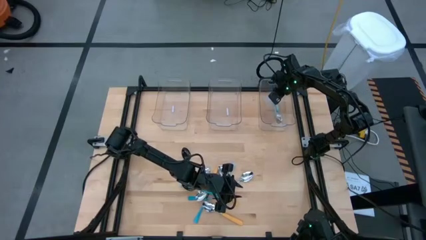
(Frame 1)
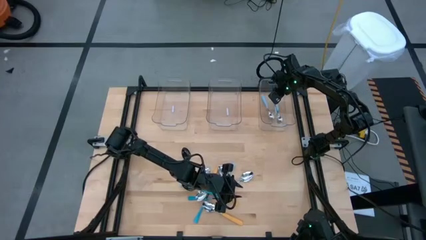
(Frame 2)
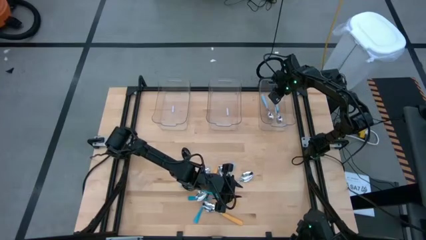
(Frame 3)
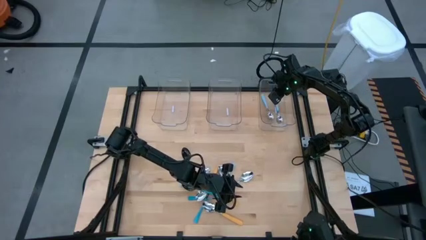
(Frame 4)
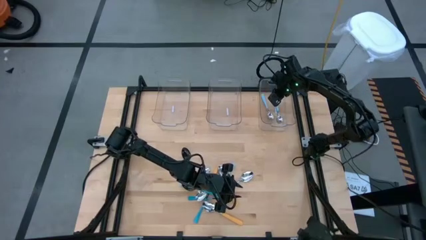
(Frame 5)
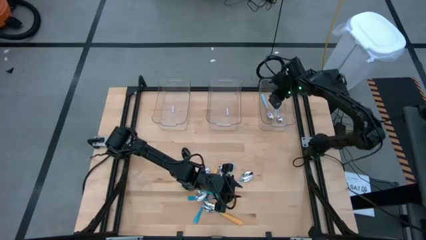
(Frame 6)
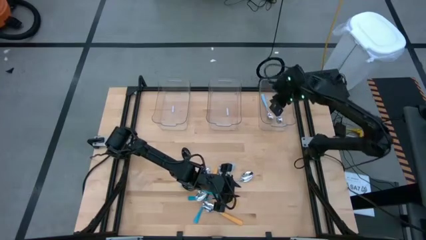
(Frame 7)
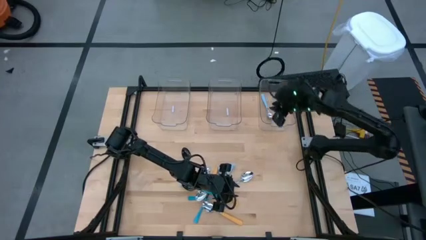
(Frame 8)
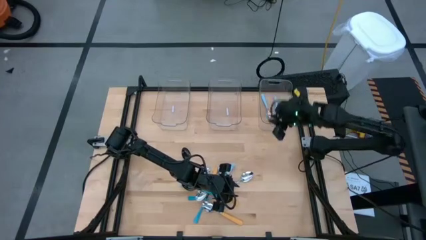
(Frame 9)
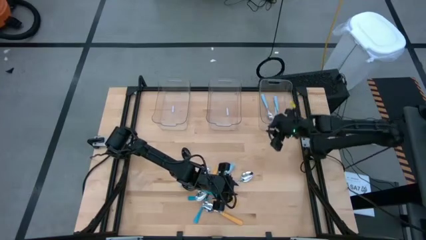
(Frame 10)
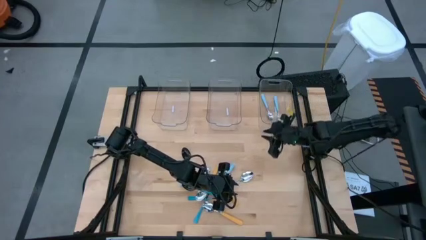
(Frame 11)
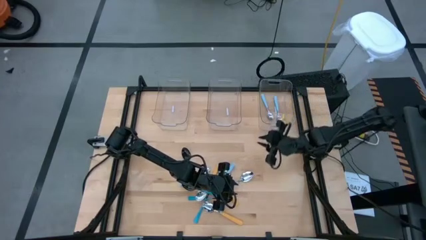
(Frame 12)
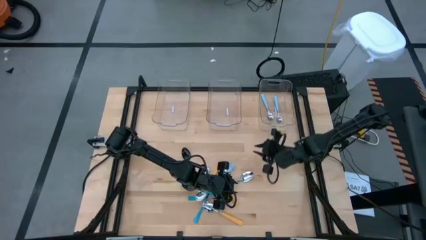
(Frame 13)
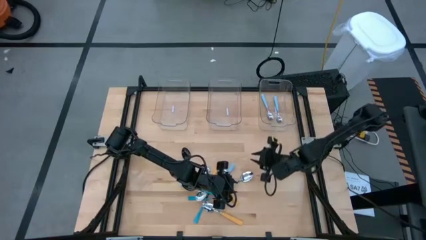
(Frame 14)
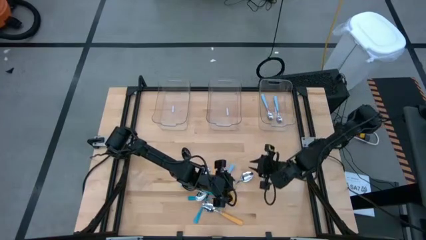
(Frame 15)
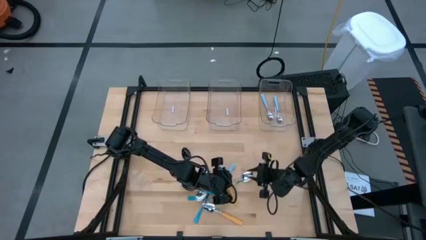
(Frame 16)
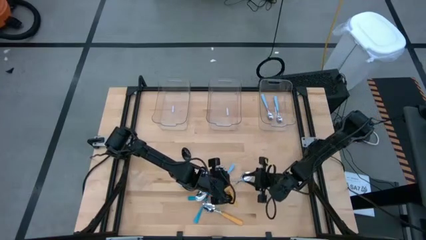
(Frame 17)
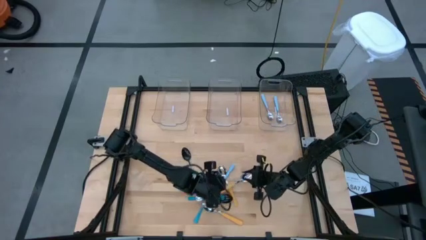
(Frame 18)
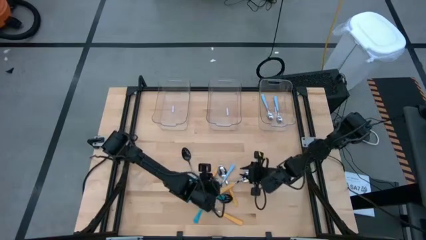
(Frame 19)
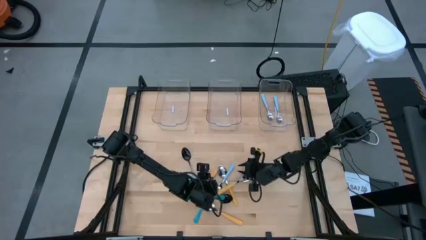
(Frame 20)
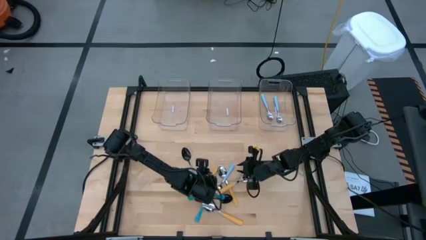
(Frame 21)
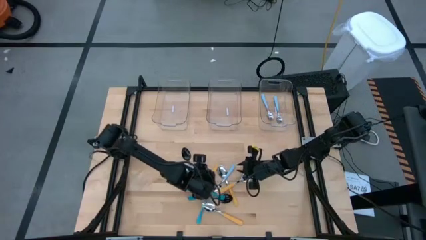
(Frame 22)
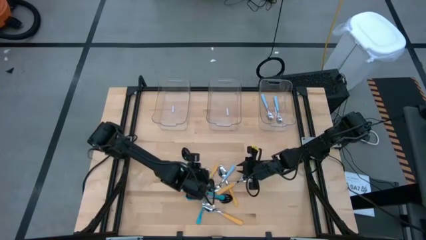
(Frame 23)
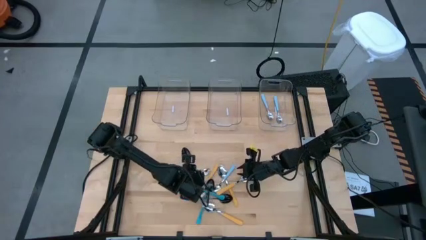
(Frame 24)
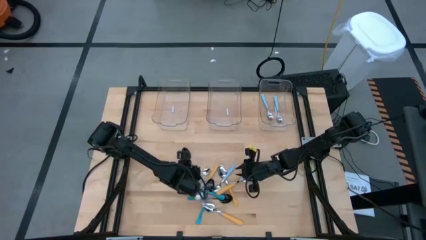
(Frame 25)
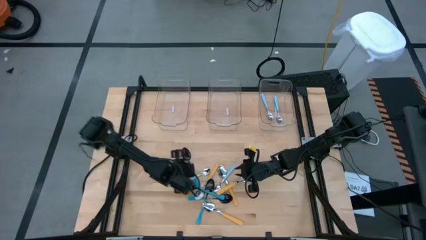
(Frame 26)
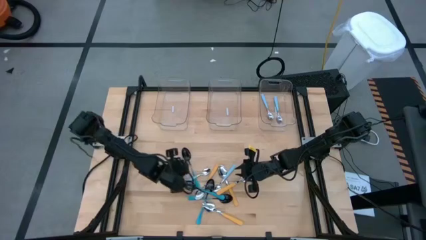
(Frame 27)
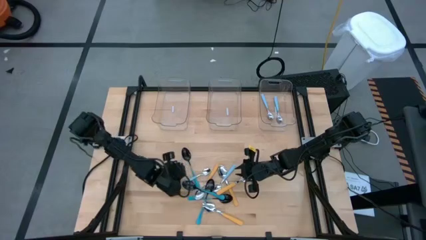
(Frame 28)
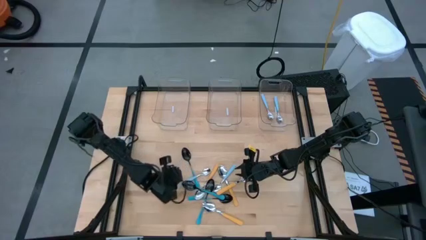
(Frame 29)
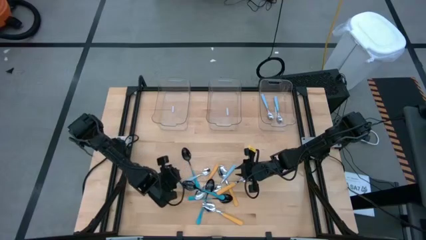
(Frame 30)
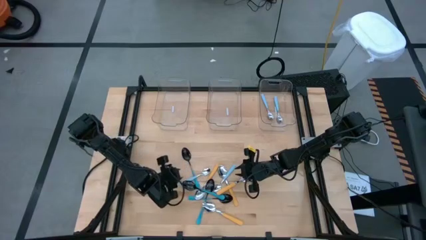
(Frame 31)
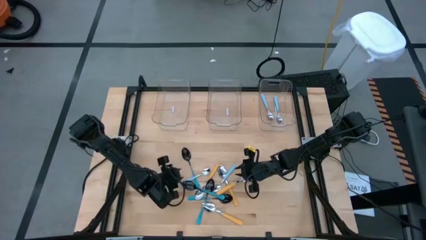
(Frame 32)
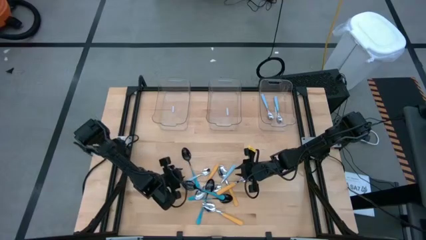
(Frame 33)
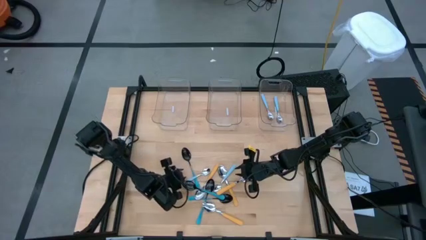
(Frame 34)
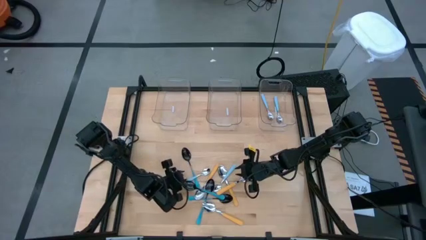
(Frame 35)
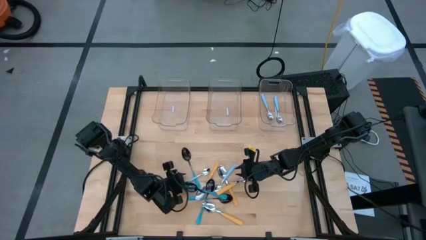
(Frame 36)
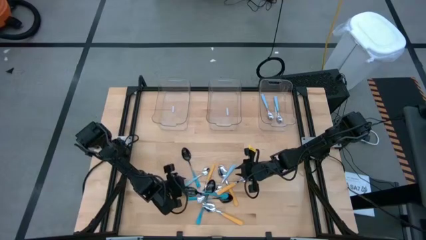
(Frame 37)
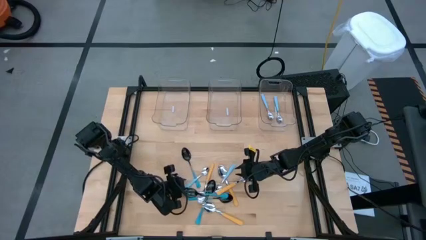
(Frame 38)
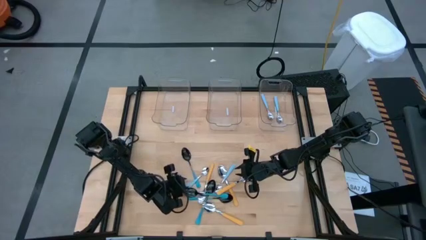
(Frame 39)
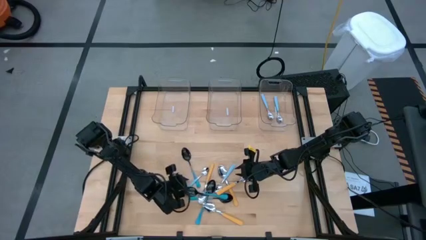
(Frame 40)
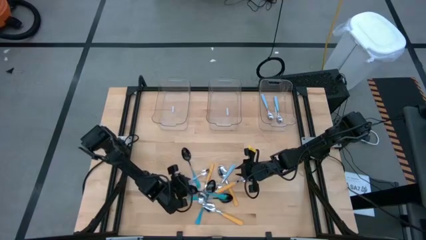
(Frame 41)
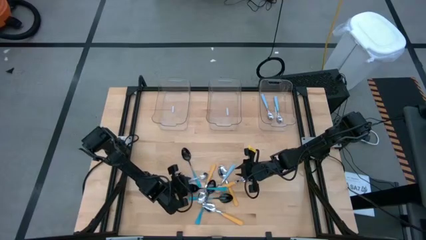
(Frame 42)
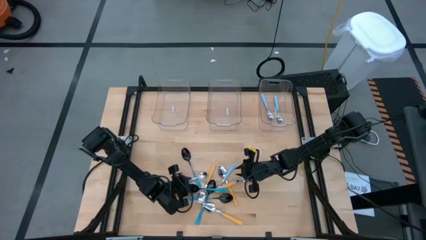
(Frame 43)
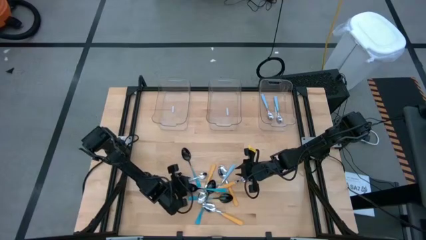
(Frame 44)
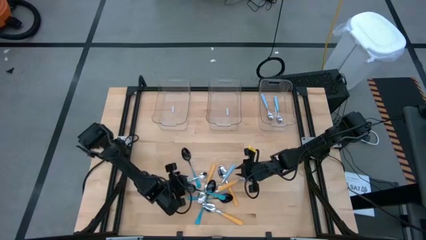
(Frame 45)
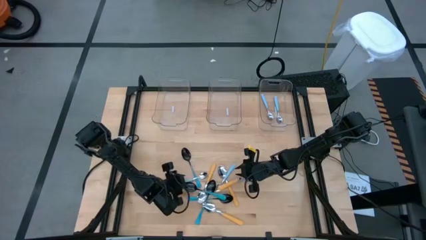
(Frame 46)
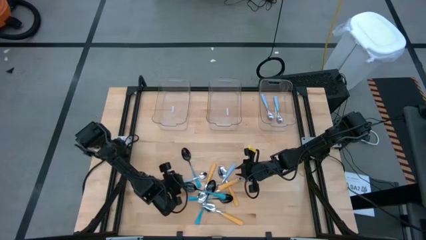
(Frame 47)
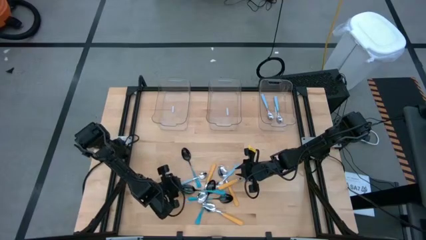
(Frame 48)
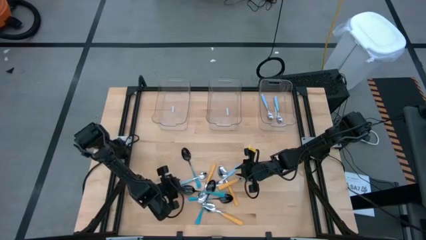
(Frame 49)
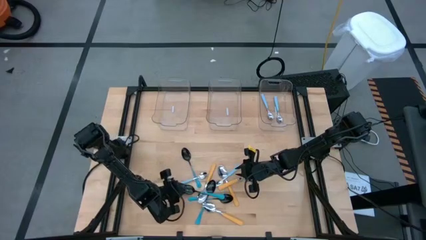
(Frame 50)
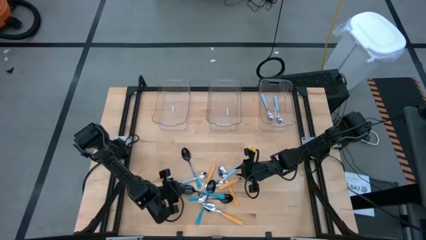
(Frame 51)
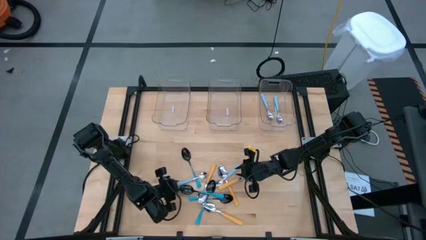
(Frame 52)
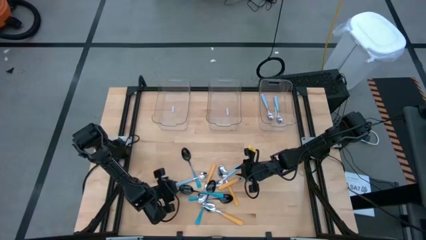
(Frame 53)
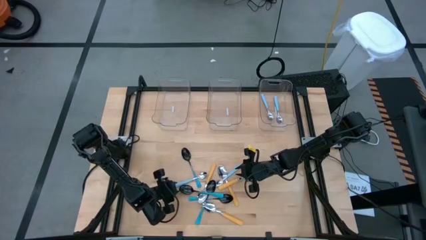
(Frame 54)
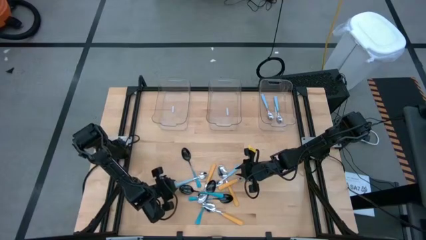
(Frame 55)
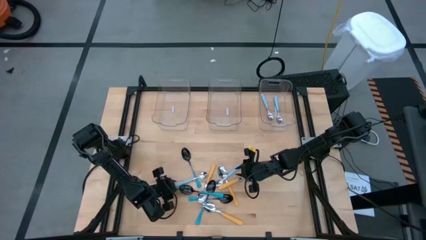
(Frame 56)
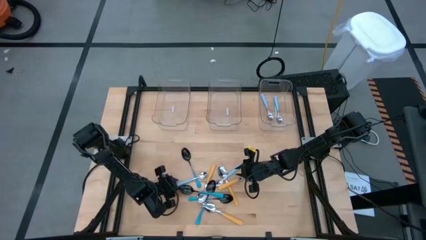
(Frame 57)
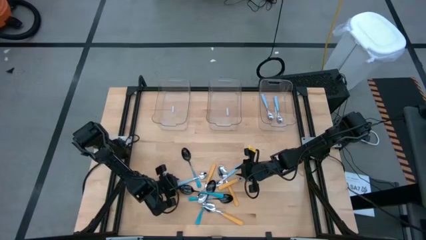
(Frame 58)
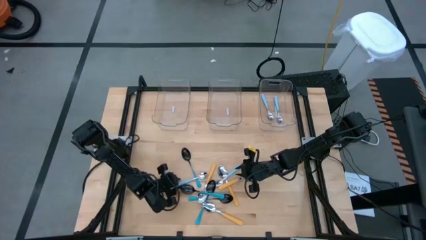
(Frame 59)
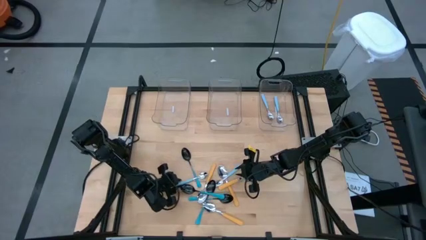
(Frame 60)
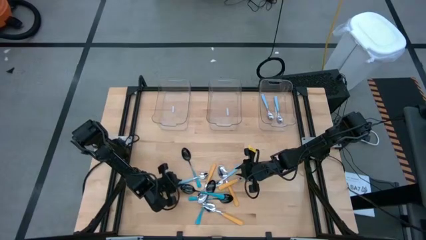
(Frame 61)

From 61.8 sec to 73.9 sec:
Task: Sort silverware by color (type)
Put the light blue spoon into the right transparent bin

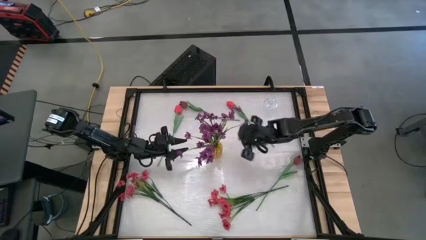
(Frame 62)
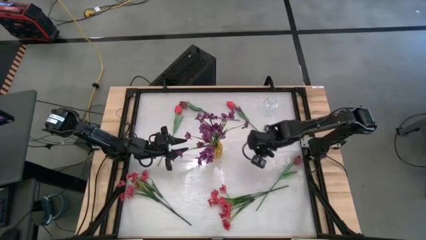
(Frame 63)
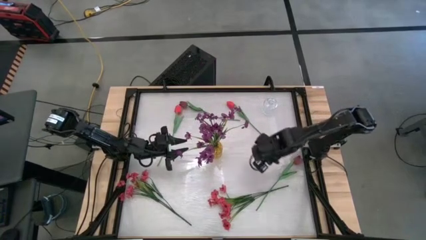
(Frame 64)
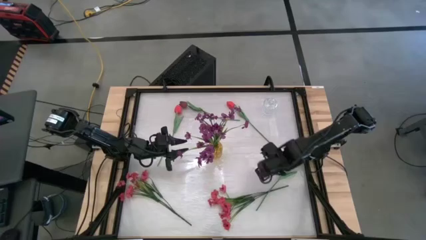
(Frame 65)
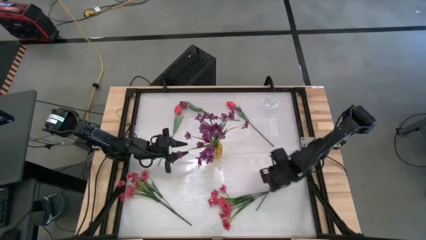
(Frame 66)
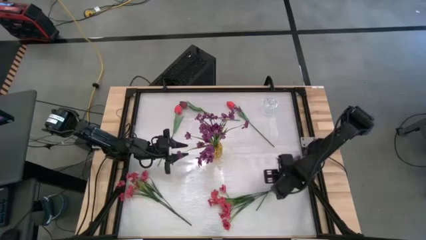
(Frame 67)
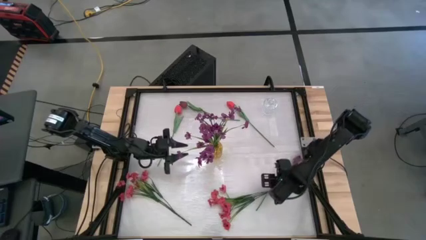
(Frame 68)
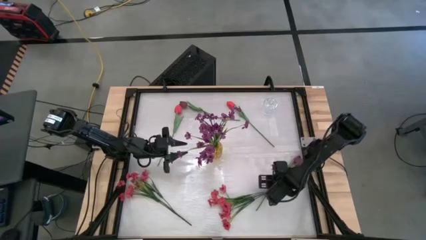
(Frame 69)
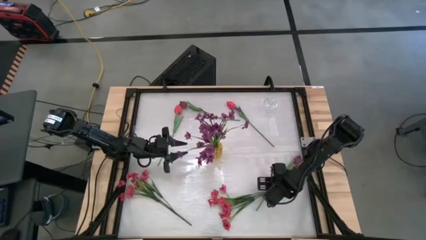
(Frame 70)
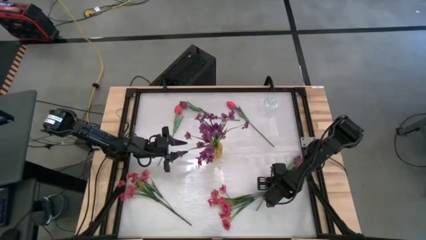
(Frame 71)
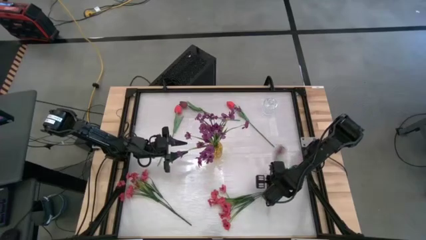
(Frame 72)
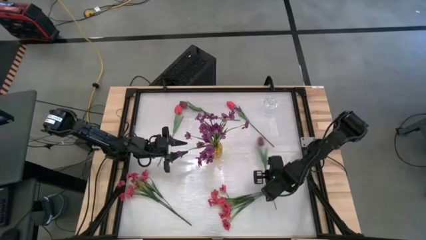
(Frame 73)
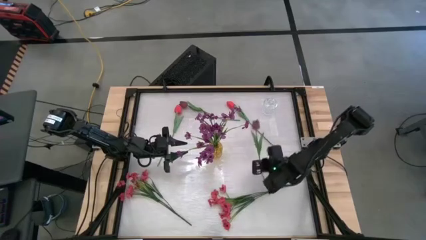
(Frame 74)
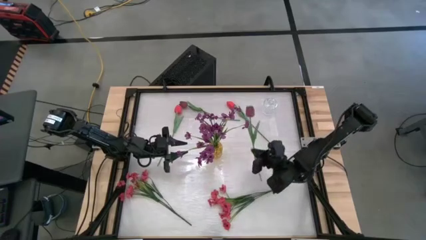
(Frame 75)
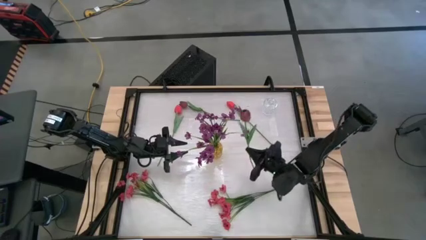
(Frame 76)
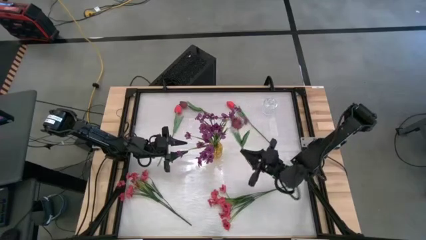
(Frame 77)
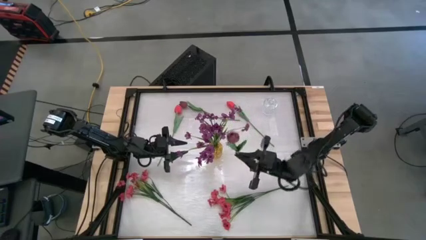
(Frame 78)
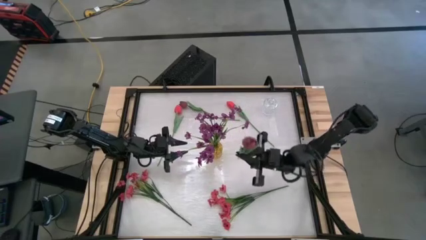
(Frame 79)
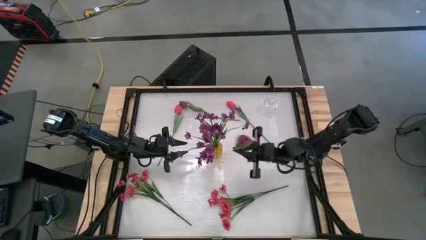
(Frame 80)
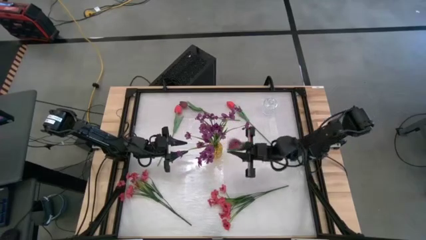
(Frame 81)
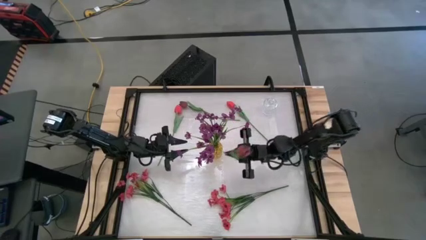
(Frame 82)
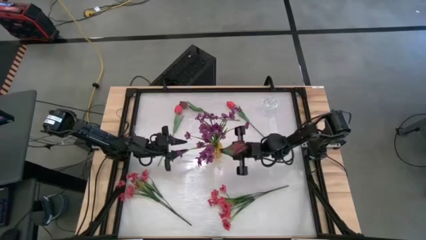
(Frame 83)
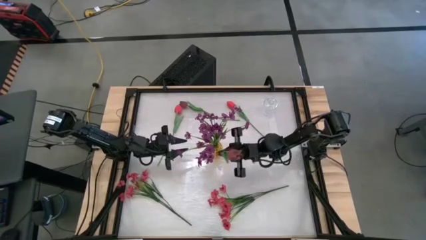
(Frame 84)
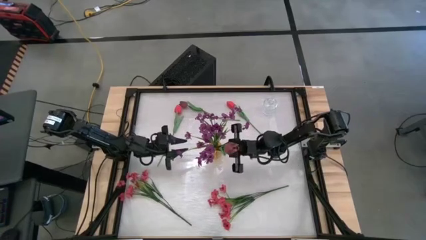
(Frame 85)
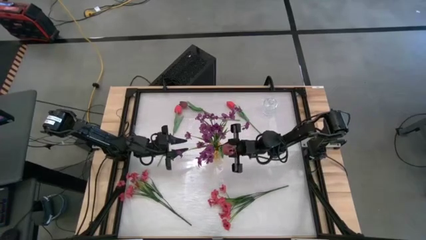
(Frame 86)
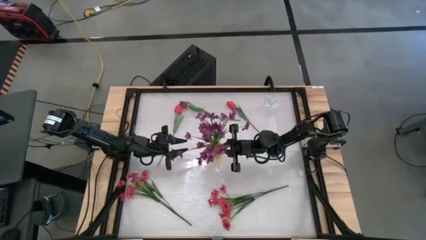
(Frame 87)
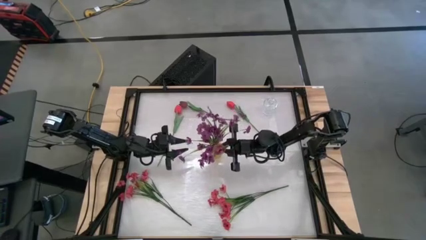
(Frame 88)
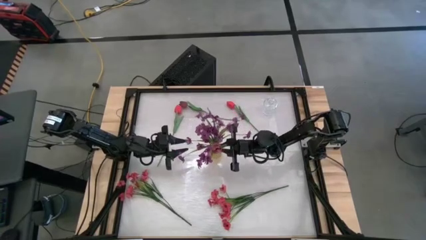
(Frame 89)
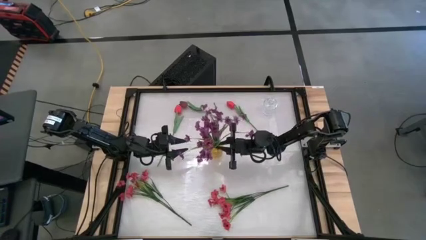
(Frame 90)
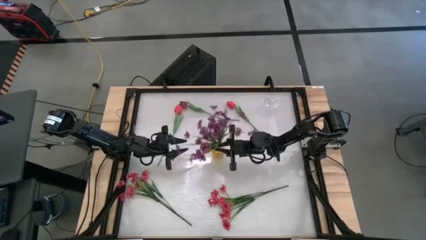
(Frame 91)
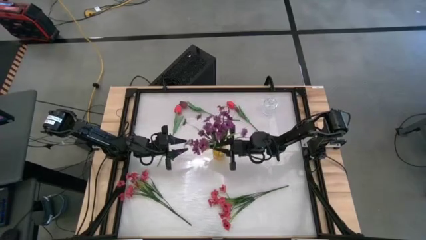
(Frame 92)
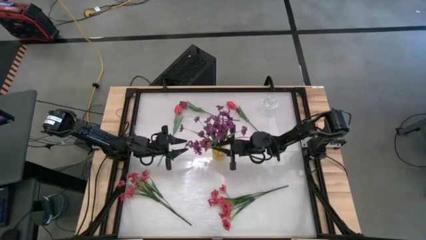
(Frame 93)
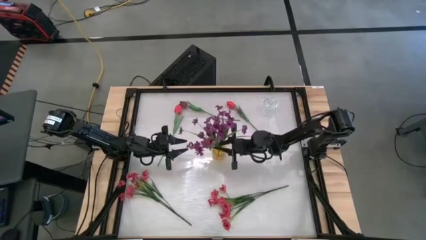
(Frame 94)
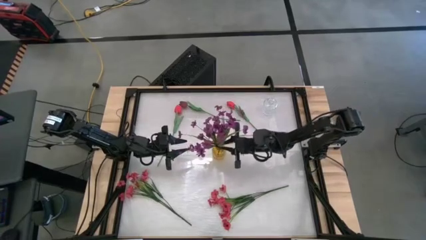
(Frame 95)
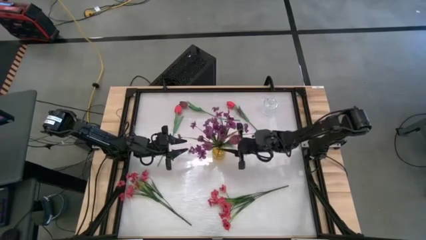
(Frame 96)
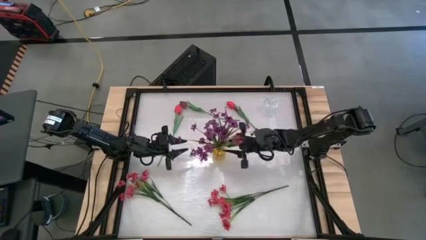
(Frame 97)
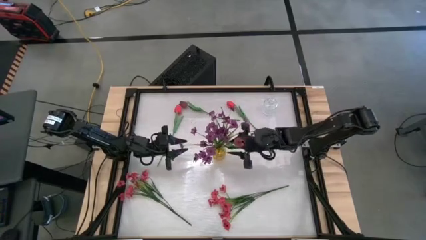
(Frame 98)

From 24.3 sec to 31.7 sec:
Task: Sort flowers into vase by color
Put the bottom purple tulip into the yellow vase
